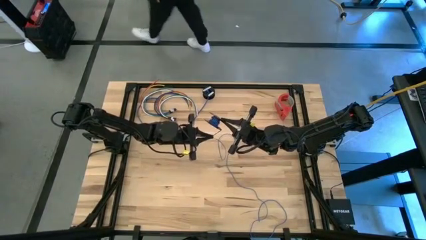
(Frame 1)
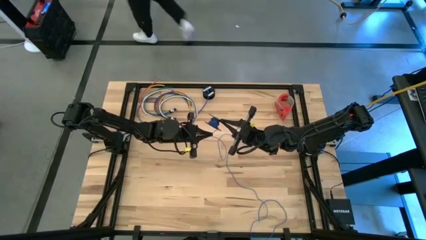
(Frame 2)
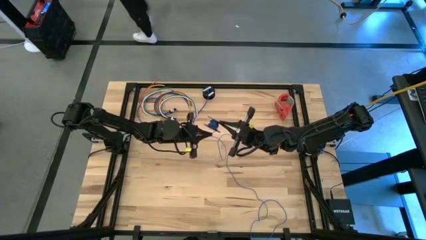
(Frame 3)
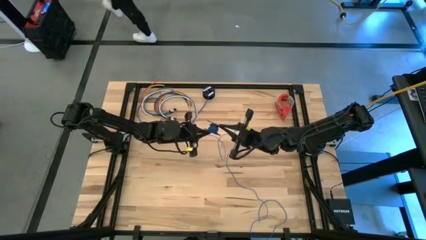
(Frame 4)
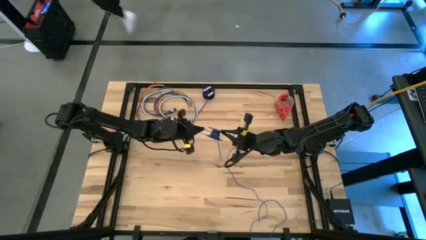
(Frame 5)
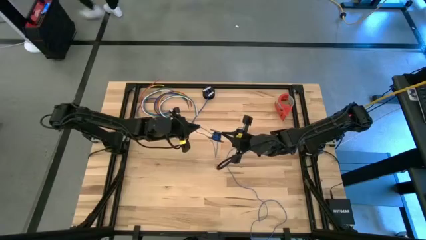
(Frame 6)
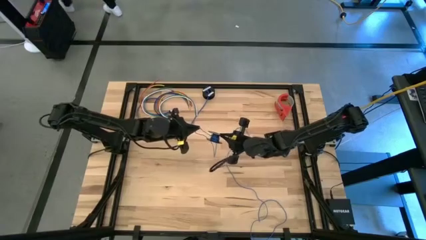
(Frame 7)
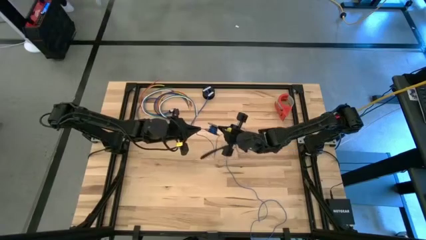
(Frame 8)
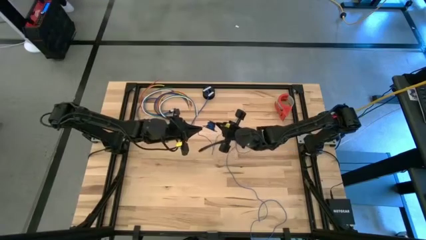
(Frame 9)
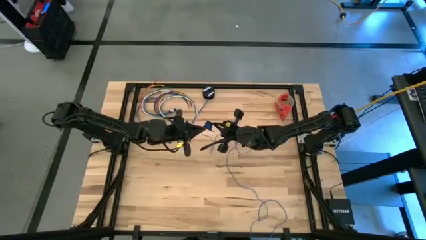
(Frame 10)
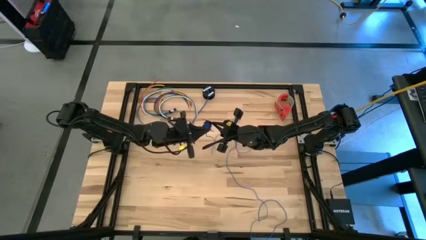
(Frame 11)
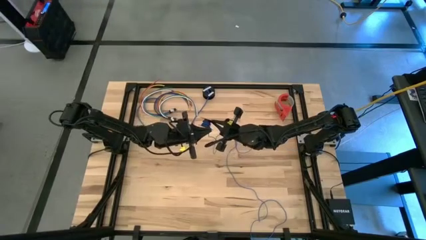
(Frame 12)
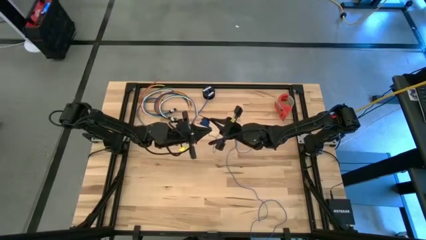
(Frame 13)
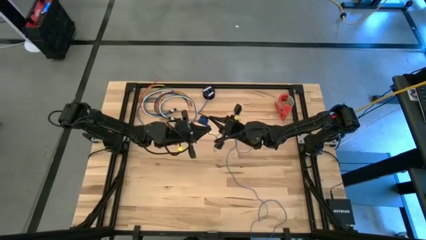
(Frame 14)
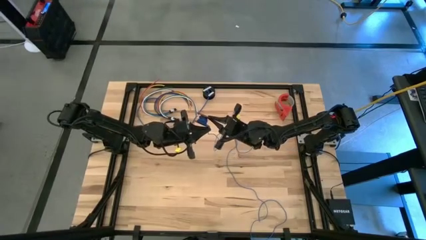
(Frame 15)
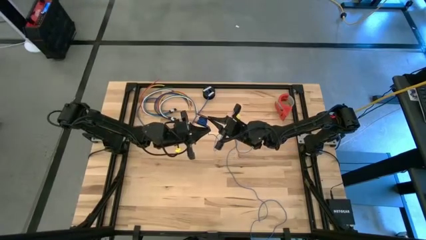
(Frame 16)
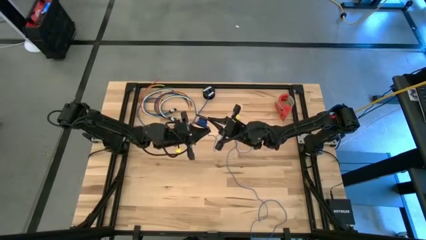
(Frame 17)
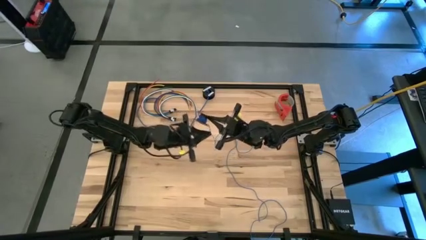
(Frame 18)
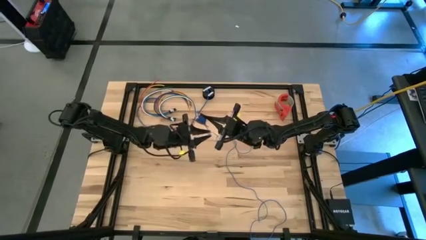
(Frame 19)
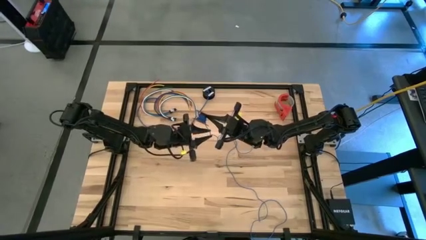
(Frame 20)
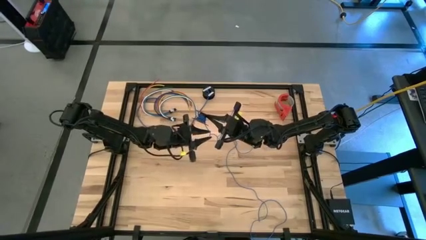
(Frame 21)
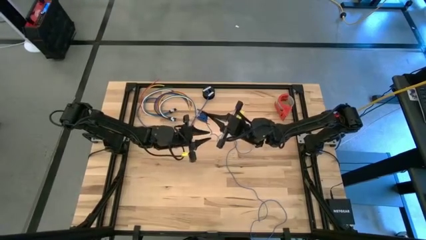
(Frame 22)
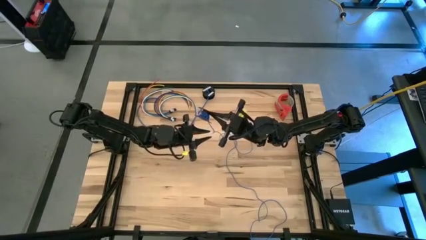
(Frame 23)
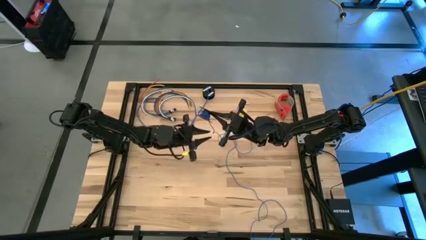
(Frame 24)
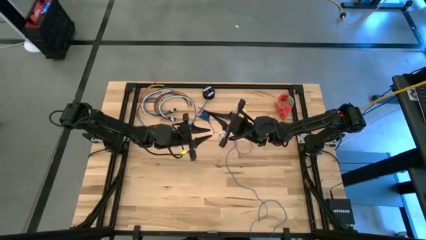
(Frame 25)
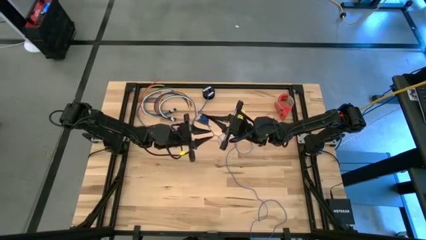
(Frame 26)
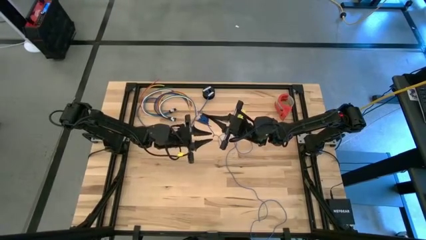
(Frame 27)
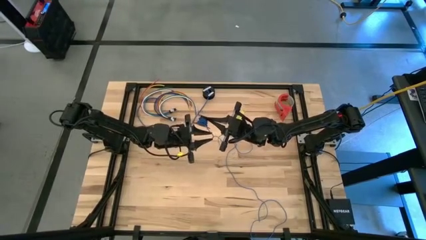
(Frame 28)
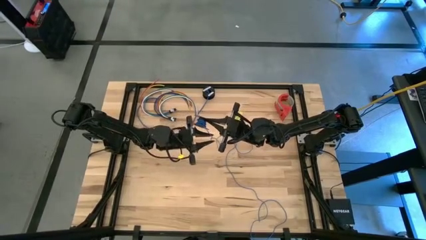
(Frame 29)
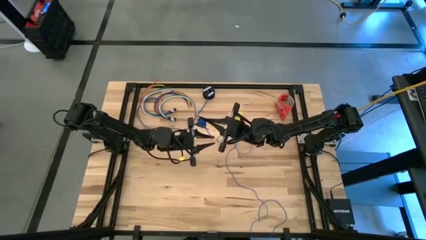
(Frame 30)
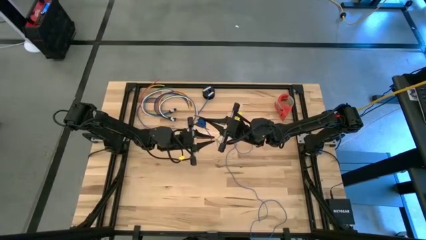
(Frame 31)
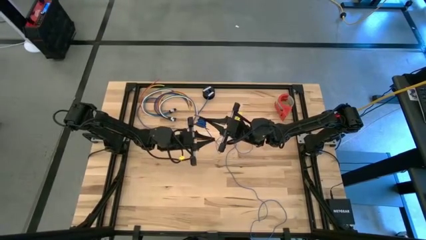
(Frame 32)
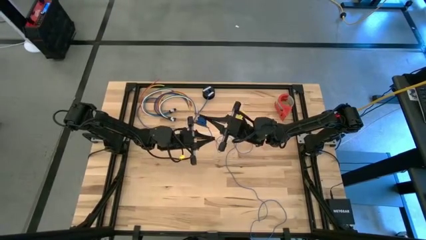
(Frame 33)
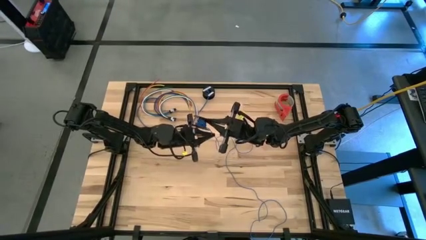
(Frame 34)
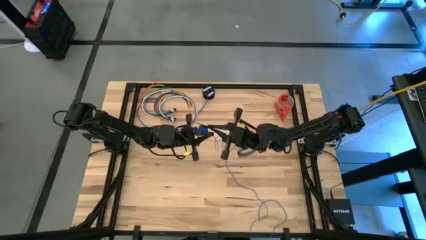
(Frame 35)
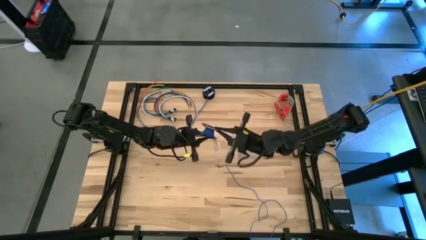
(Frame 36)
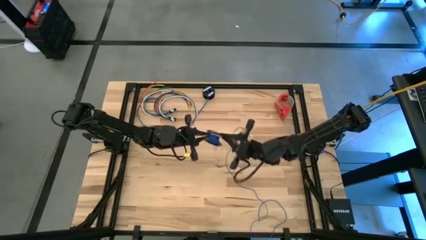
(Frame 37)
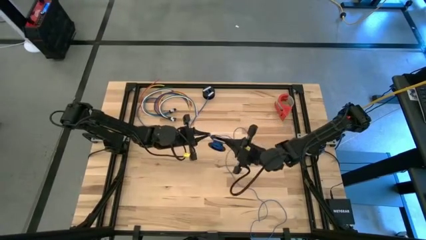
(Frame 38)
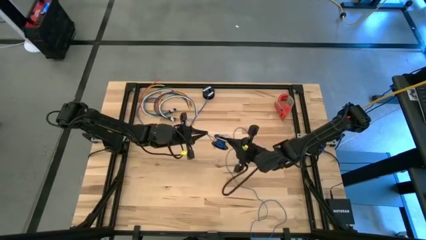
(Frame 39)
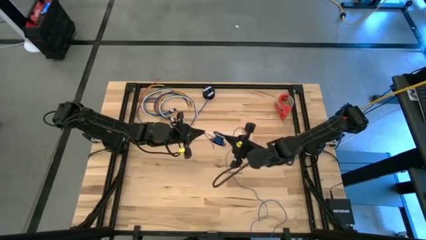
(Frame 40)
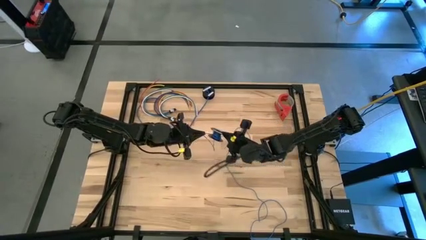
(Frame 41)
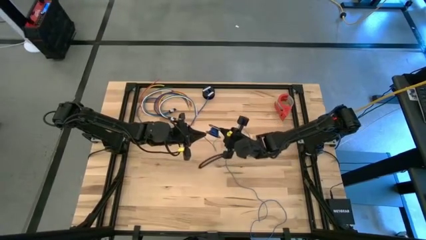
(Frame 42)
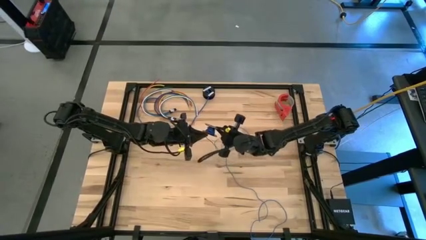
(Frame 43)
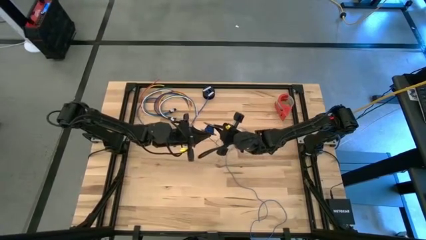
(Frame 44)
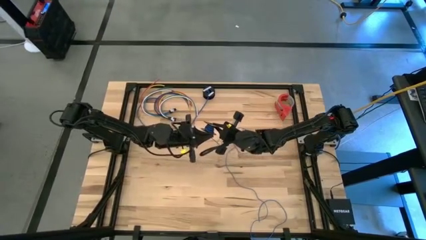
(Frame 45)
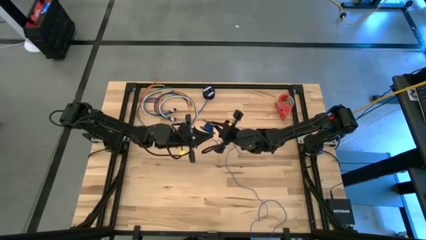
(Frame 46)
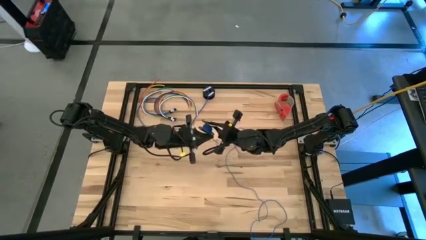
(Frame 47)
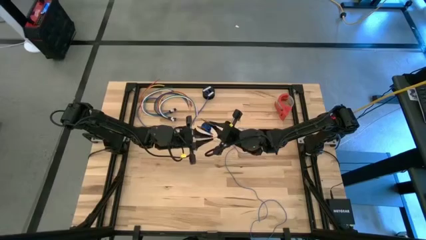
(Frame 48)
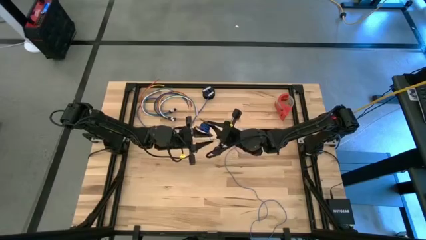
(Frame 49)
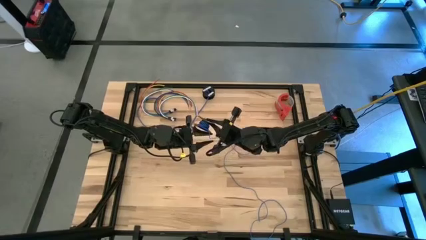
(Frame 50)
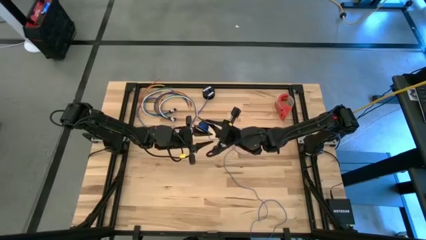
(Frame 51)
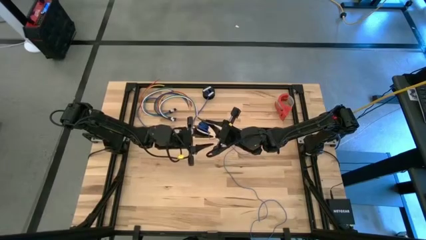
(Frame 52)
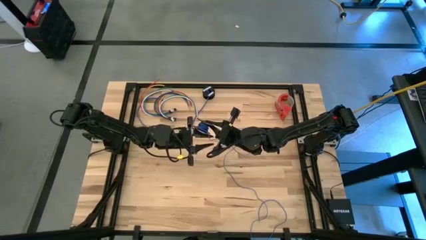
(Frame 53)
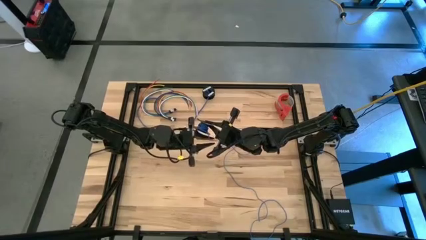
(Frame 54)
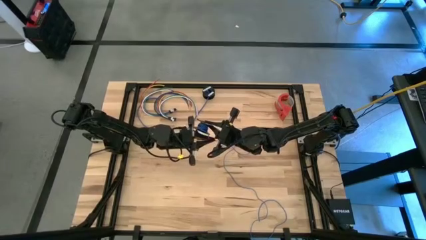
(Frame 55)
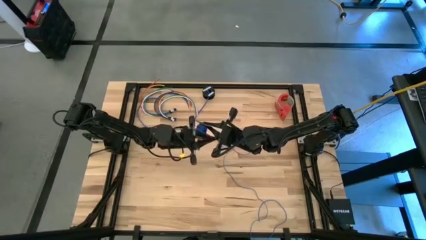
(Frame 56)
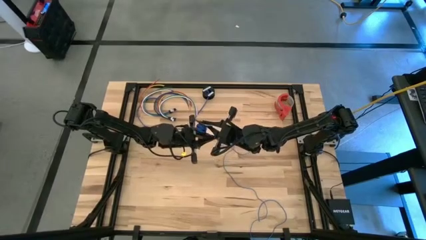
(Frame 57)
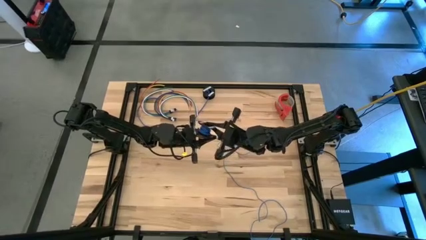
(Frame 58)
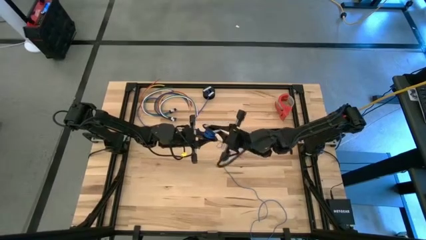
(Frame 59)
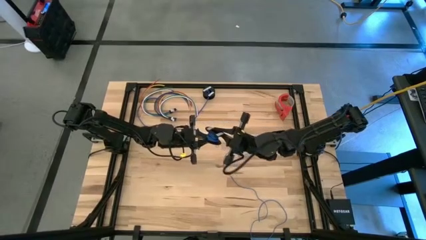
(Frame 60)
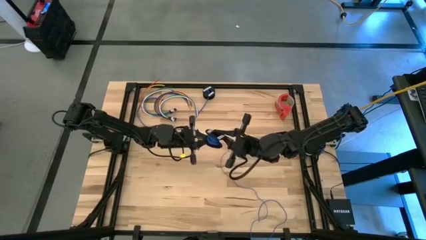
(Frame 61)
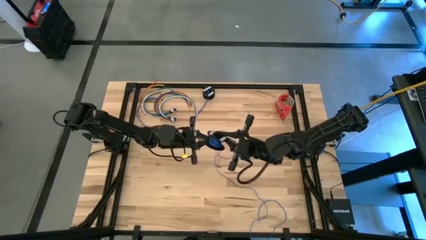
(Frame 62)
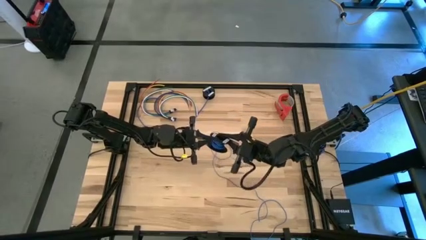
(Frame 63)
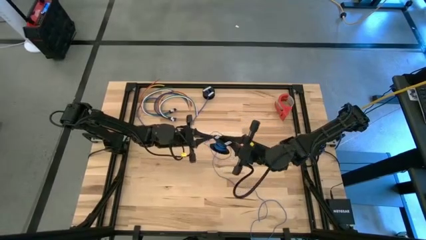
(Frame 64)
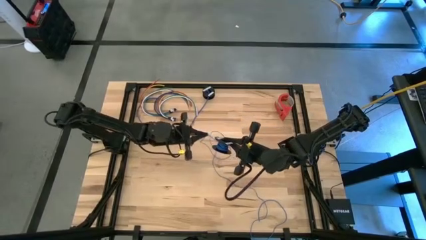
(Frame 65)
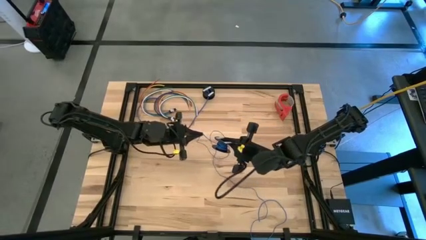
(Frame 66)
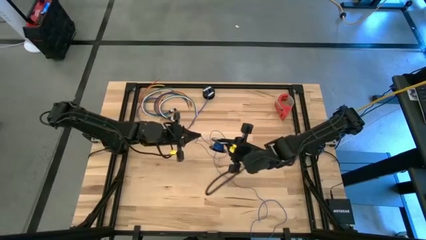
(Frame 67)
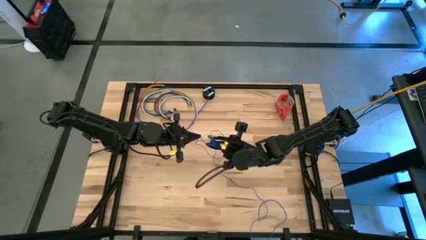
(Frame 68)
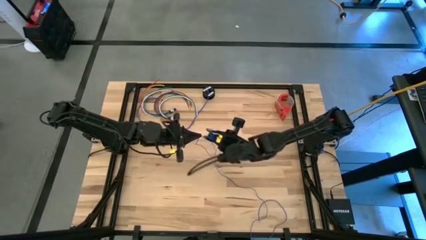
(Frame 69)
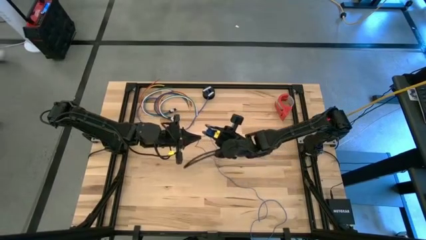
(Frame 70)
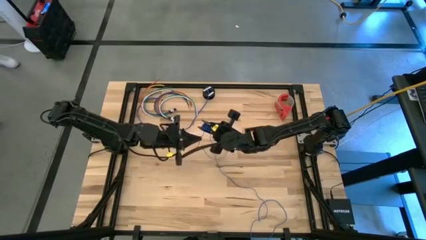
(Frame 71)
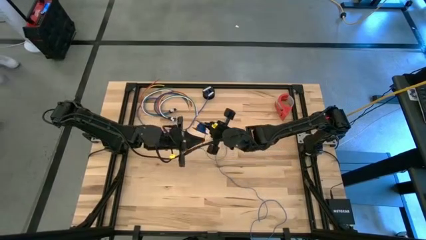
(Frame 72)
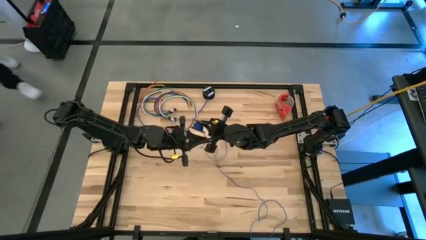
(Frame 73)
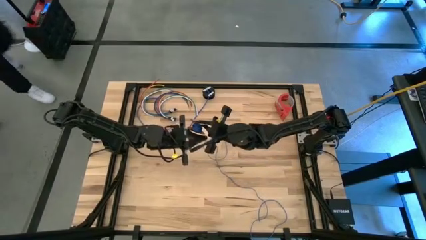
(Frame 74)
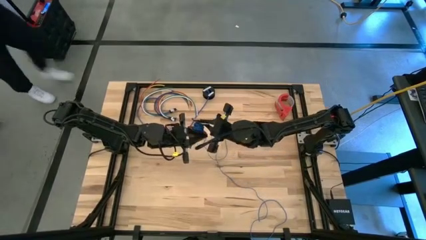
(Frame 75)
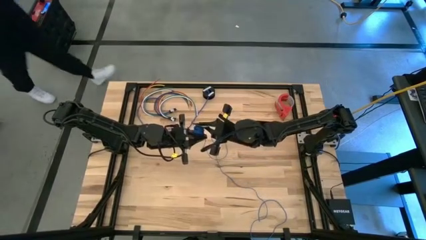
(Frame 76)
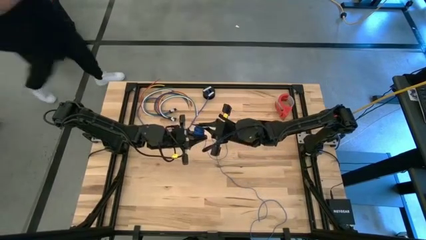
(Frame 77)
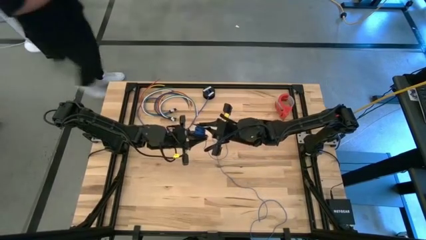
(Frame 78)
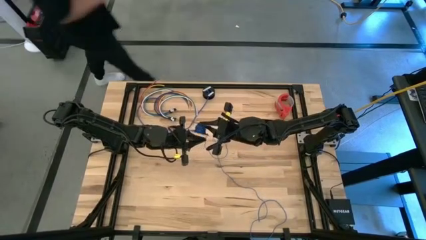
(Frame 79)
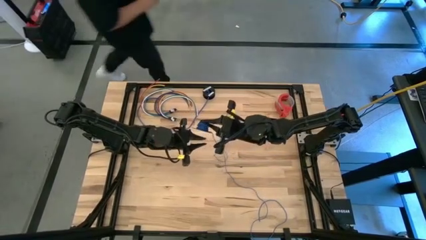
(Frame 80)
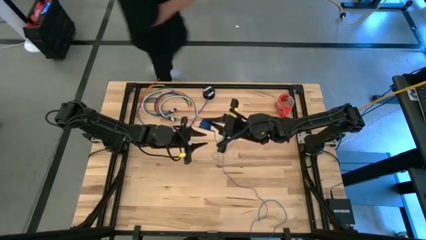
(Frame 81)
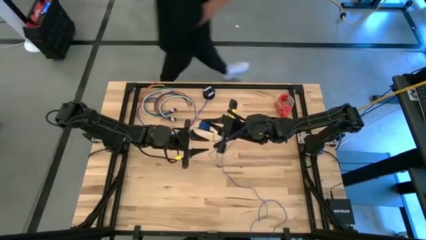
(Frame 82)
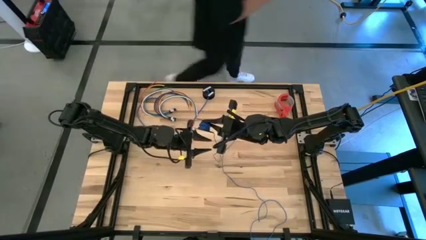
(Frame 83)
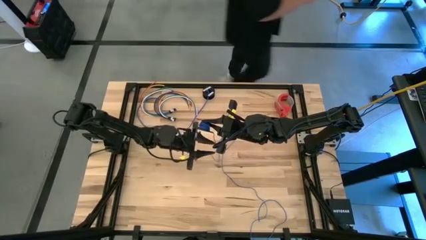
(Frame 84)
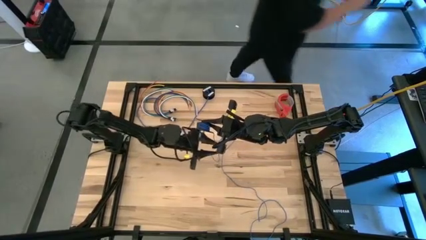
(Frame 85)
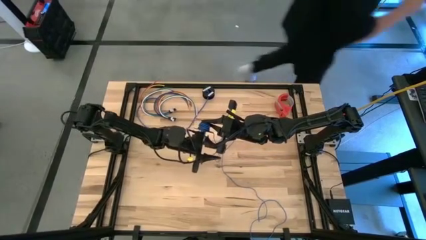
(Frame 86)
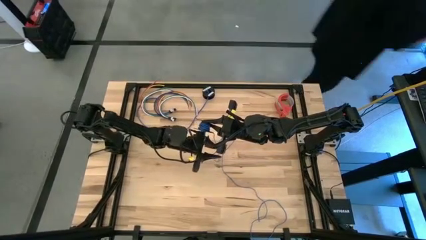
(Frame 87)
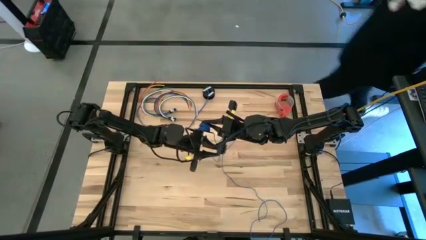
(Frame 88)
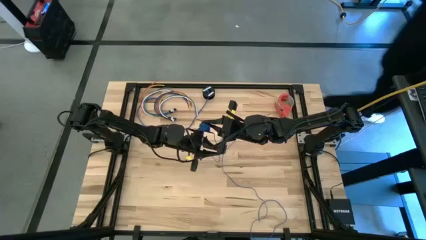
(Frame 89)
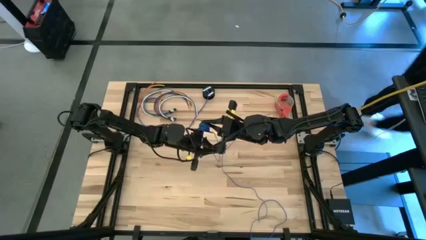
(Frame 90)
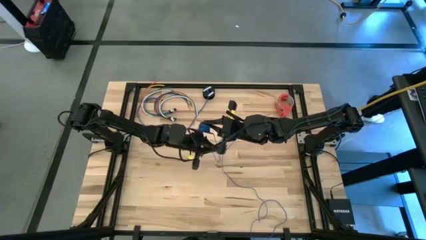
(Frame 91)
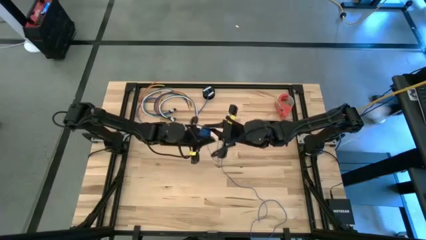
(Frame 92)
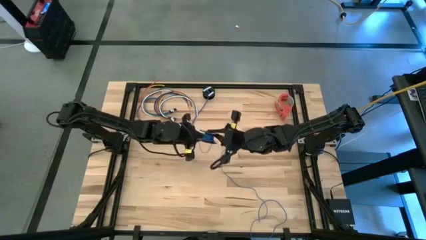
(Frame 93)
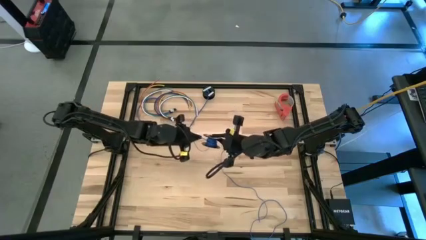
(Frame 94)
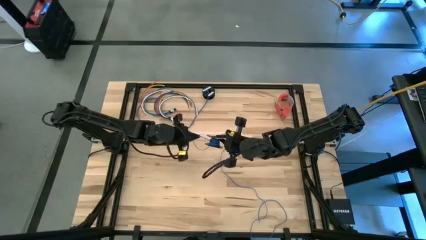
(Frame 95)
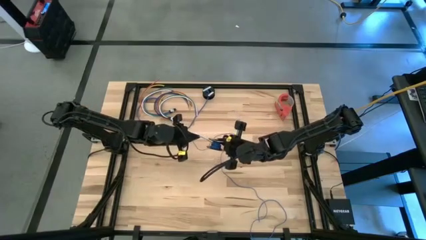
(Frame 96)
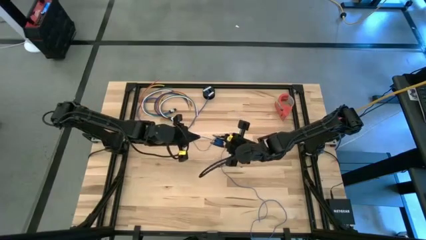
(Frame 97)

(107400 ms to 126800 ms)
Task: Coil cords
Coil the blue wire onto the black spool
